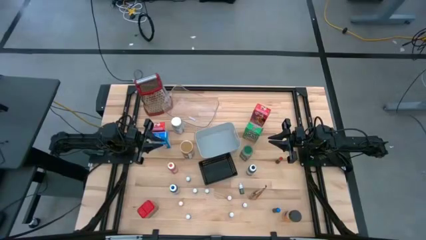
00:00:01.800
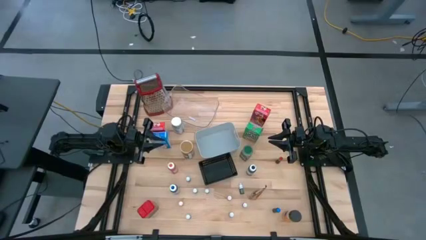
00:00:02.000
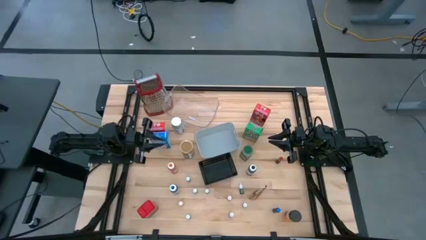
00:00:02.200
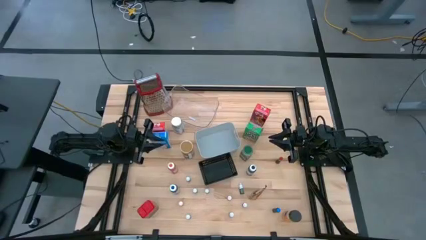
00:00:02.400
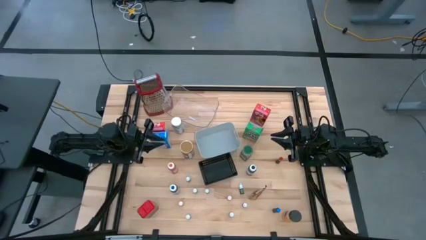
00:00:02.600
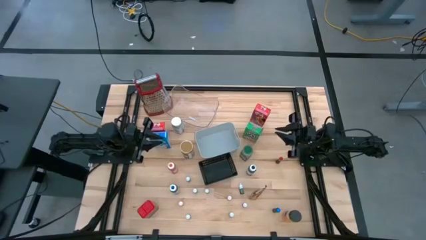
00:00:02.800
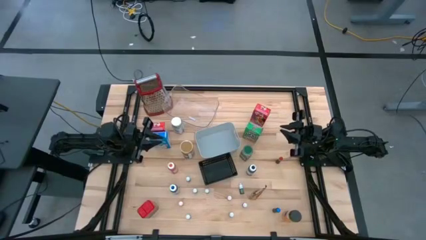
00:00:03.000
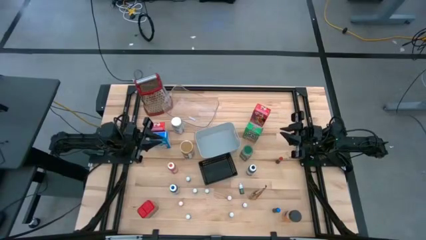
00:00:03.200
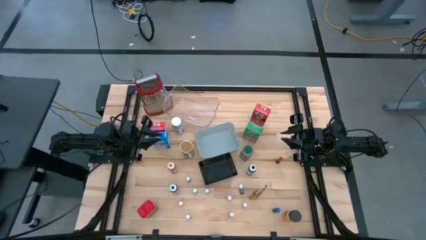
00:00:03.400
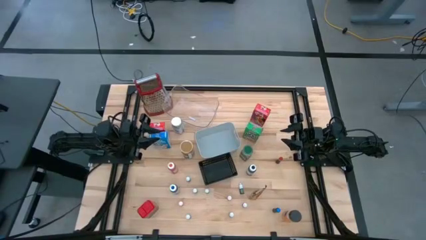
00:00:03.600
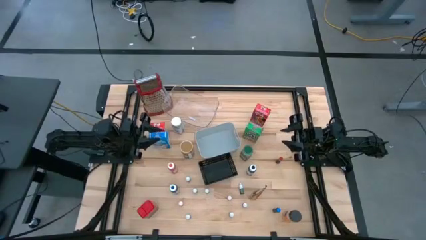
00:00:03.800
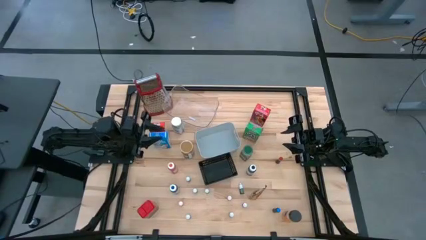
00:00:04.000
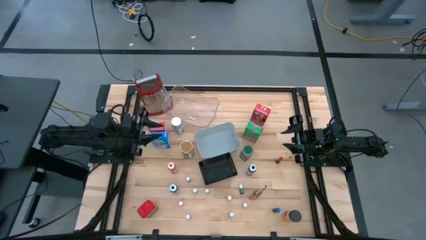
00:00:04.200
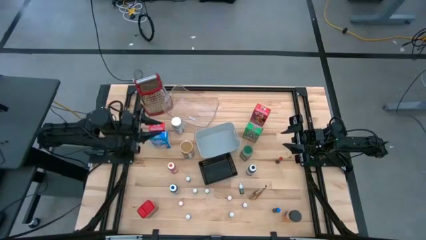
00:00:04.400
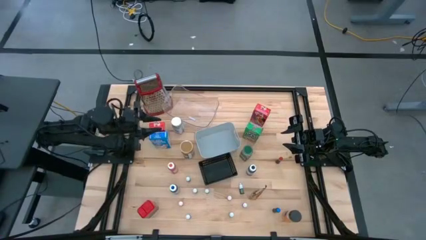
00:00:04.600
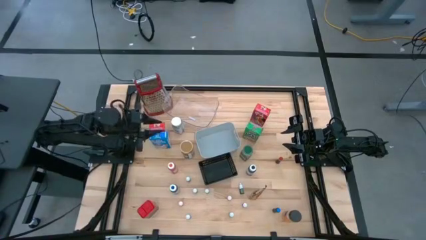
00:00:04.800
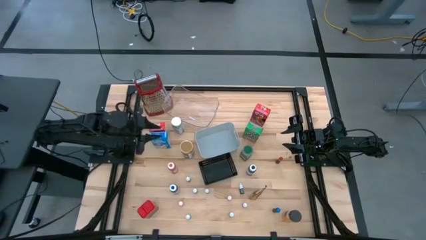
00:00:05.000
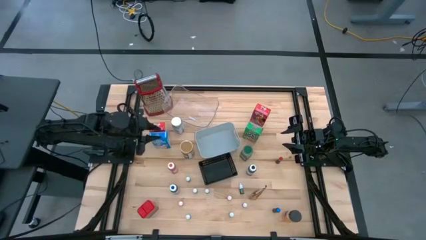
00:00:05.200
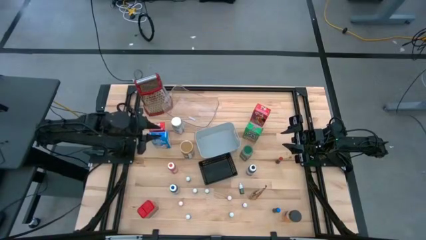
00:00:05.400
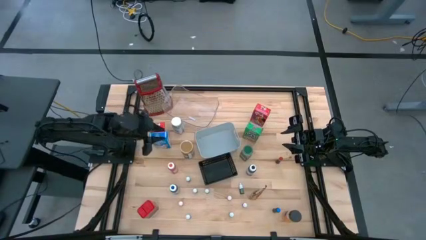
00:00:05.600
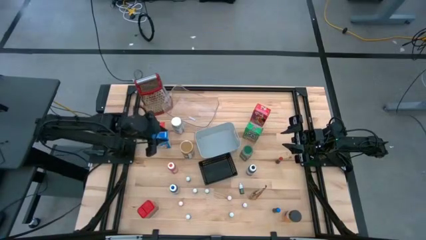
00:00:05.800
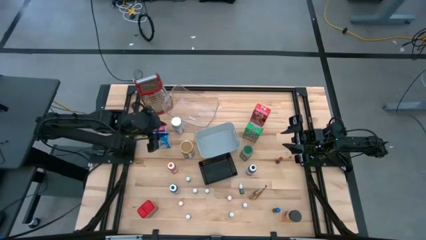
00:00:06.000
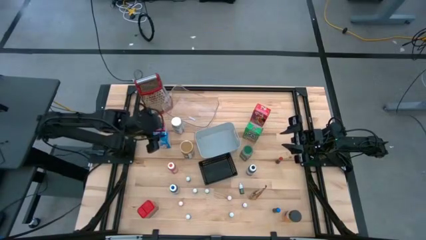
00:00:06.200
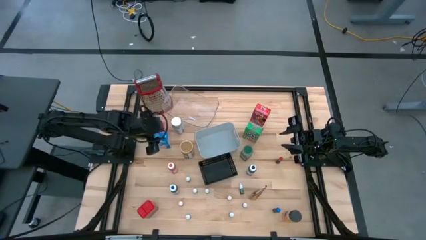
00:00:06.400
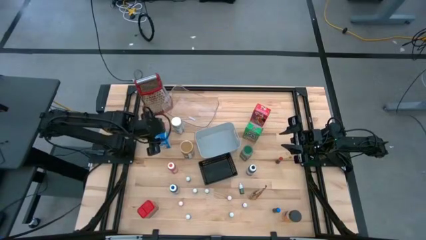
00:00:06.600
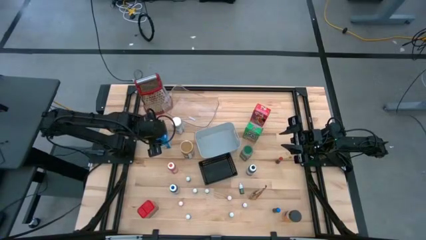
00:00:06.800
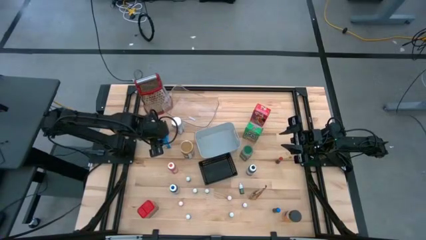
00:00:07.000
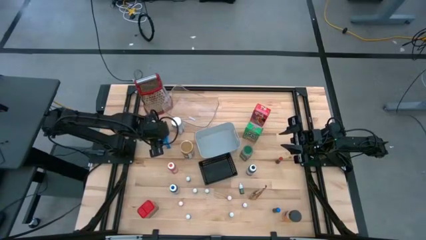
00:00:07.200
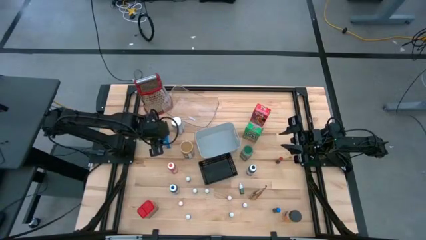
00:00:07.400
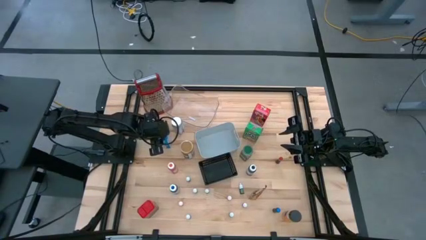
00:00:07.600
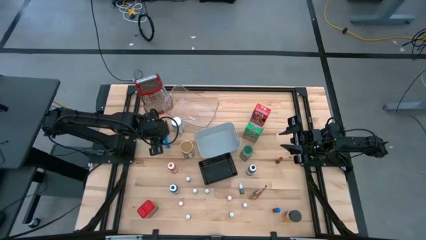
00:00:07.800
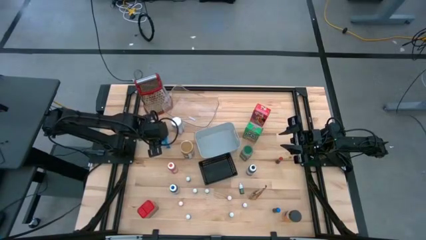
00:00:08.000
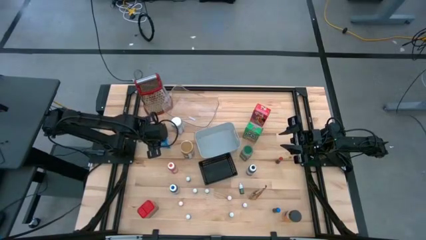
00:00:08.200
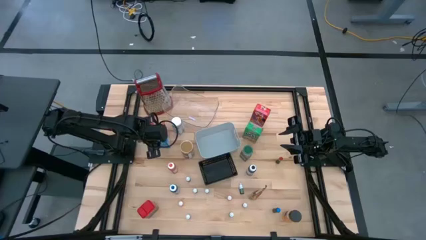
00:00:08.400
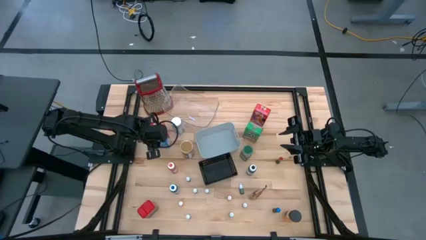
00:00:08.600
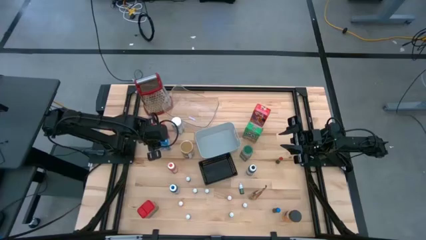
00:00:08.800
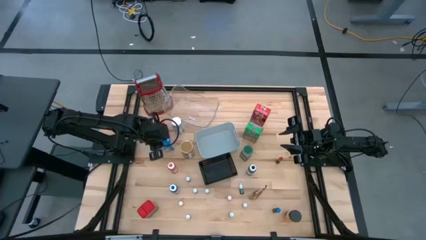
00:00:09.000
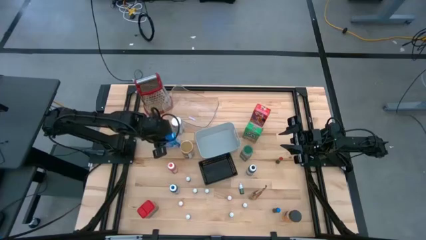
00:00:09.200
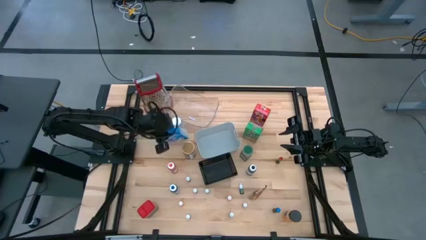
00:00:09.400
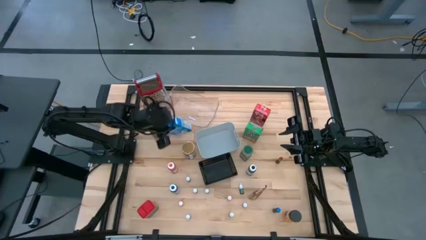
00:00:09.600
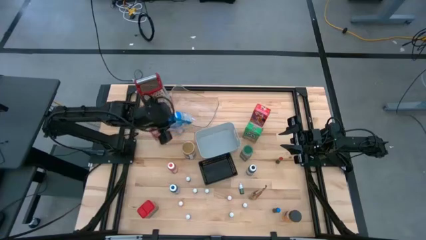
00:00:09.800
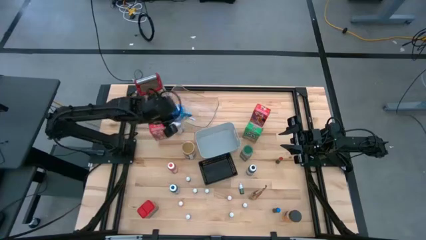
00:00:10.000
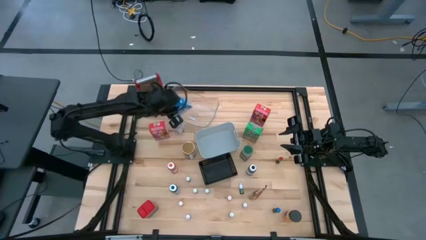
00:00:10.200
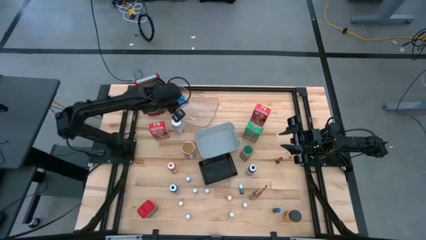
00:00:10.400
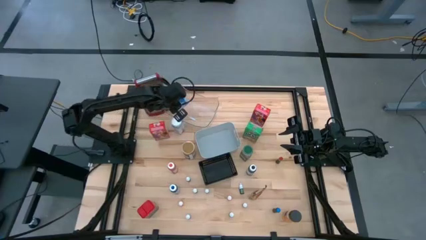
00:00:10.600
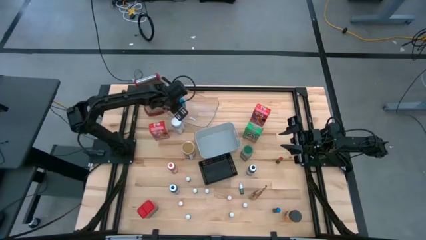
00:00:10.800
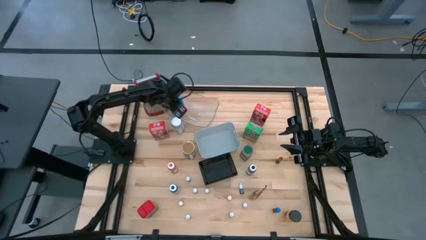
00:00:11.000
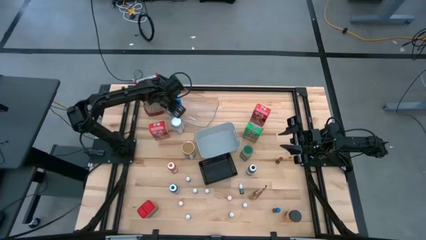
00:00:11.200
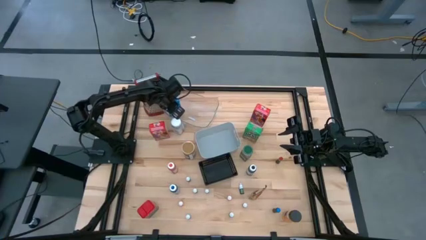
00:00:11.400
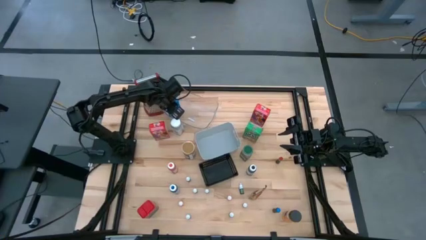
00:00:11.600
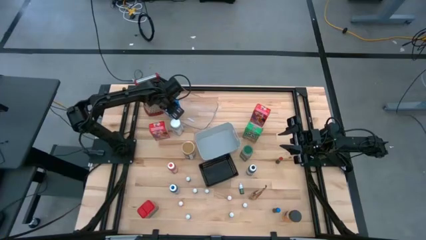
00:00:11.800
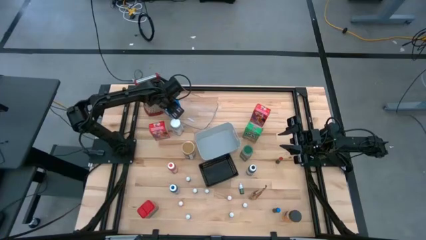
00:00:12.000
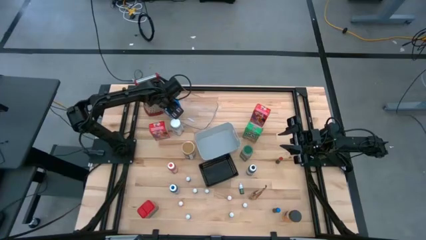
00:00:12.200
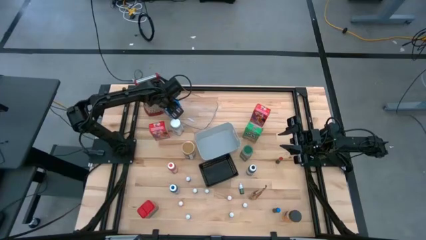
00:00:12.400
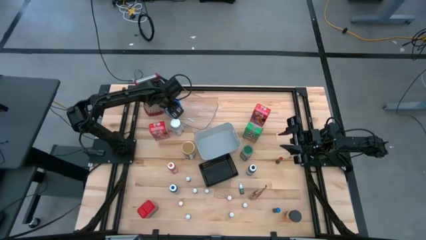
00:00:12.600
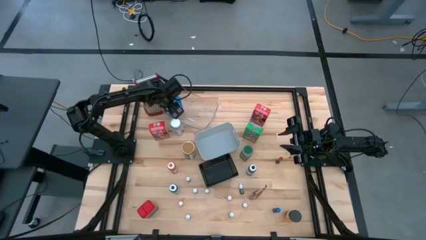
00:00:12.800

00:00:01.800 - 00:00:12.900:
Task: Pick & Place Kitchen Items
Put the blue cereal box into the transparent bin
